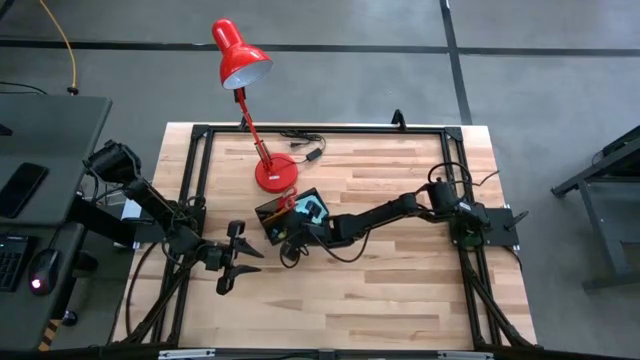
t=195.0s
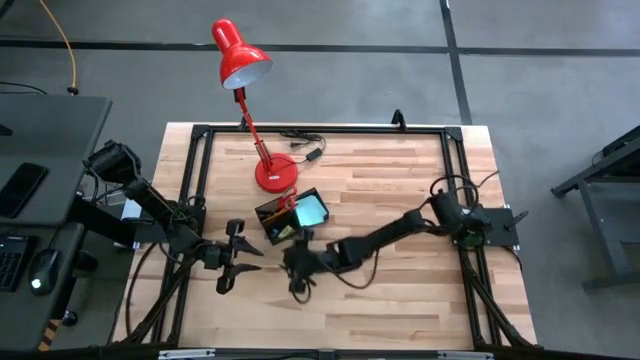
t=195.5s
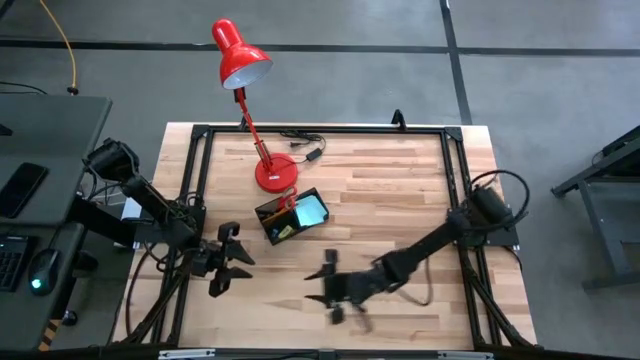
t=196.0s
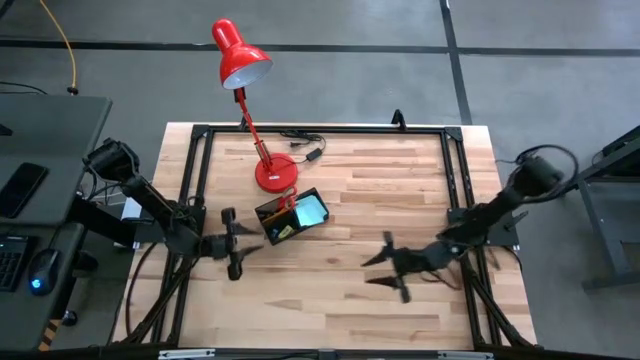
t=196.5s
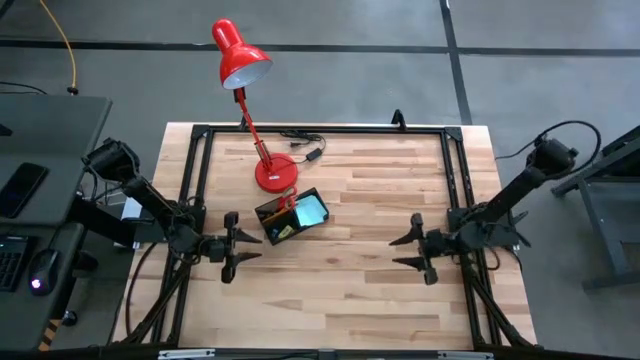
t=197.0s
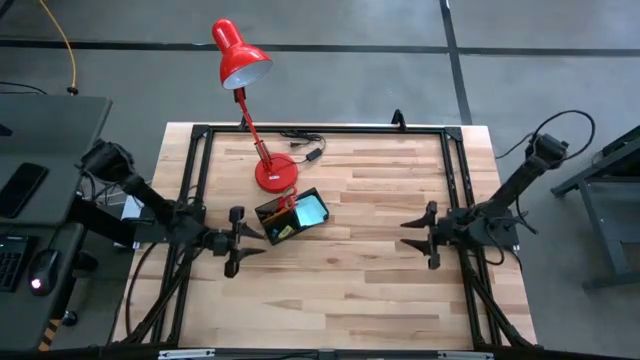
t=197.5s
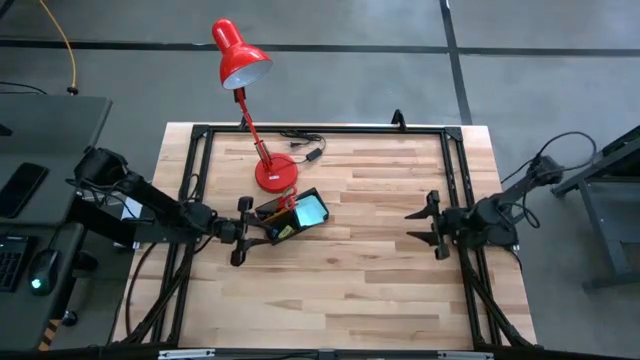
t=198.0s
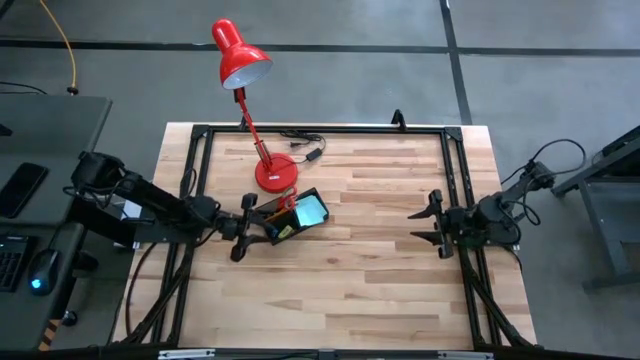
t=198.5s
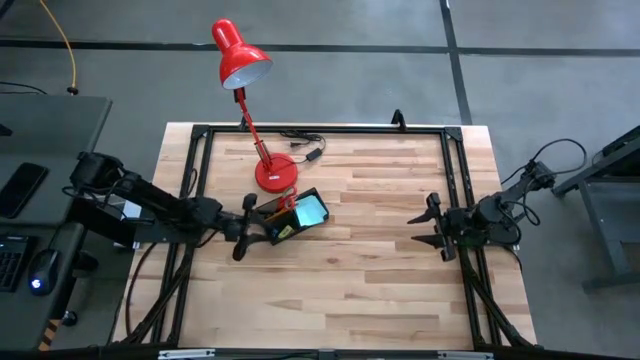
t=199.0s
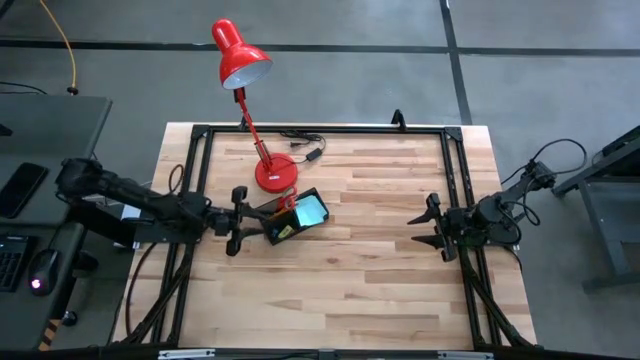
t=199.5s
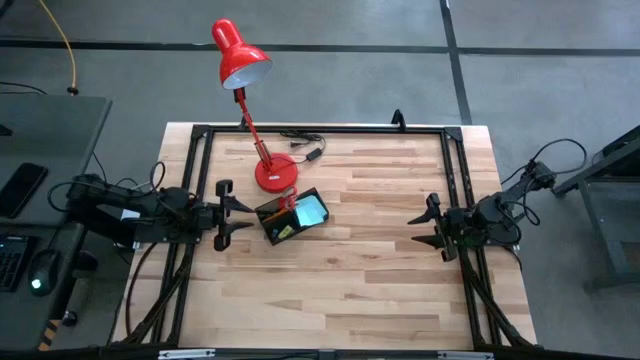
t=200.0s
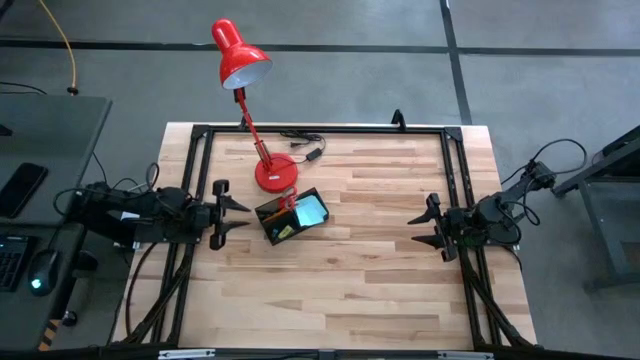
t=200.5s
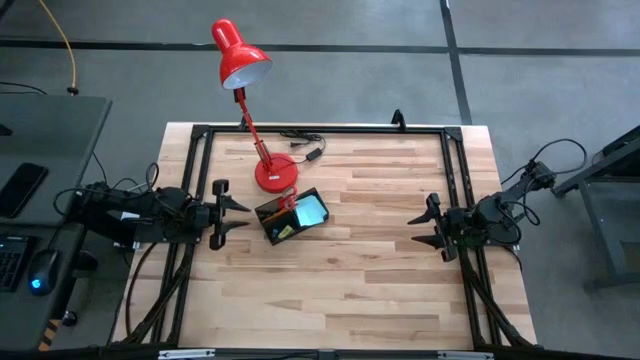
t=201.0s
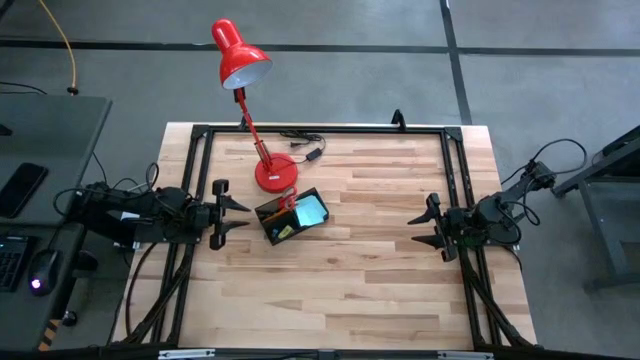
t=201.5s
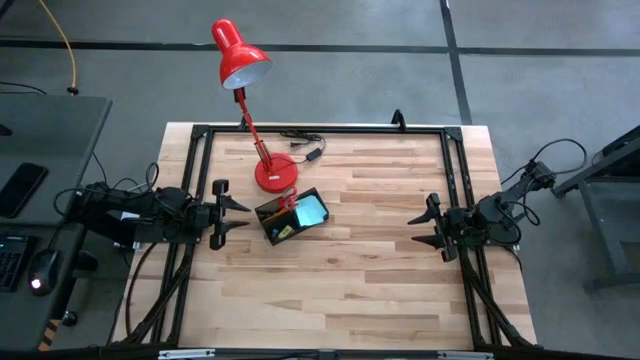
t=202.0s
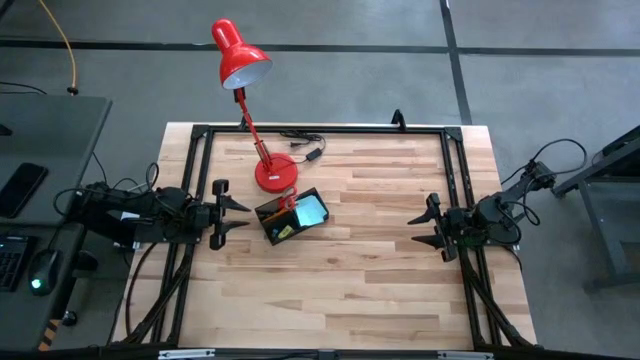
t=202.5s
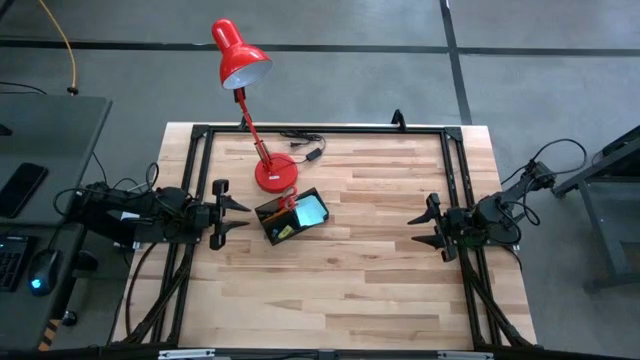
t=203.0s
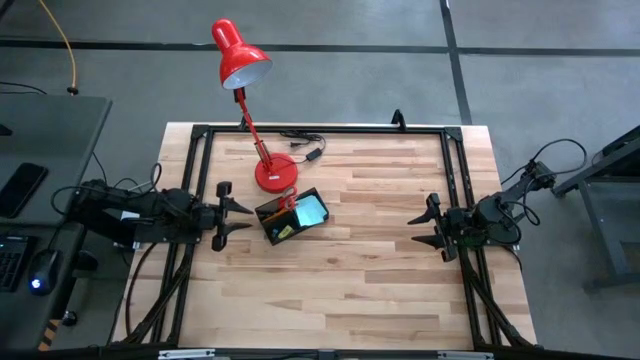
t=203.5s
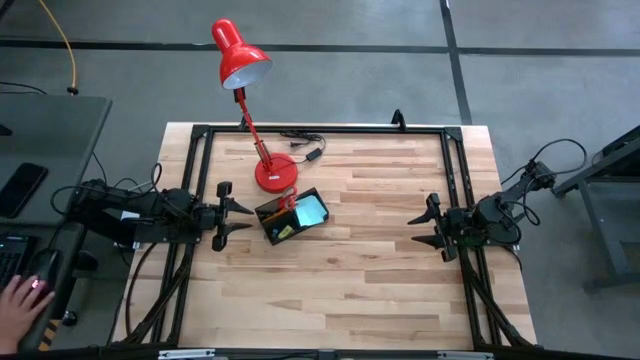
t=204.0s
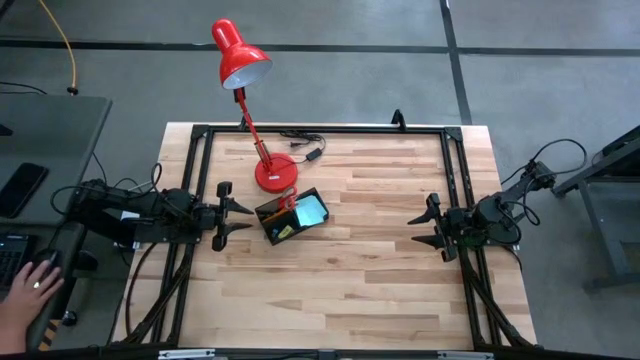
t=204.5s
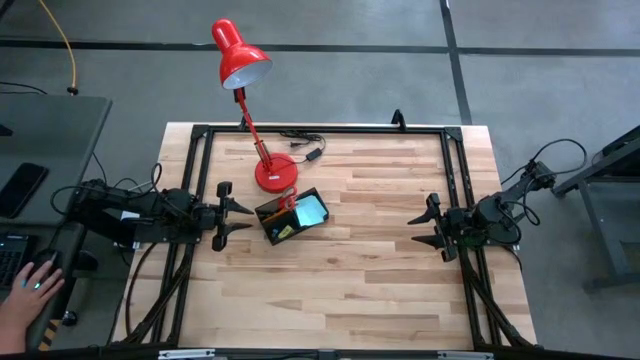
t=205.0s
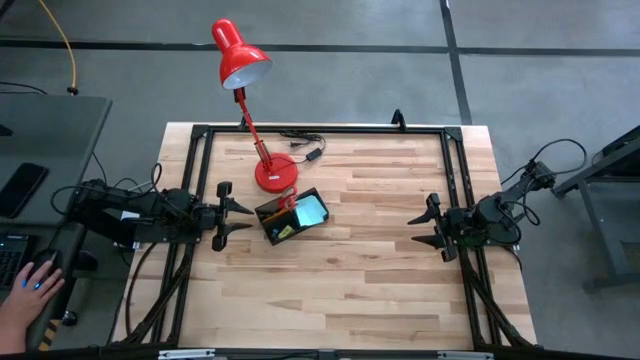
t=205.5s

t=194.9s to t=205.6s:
Task: Pick and place office supplies into organizer
Return to Home Position

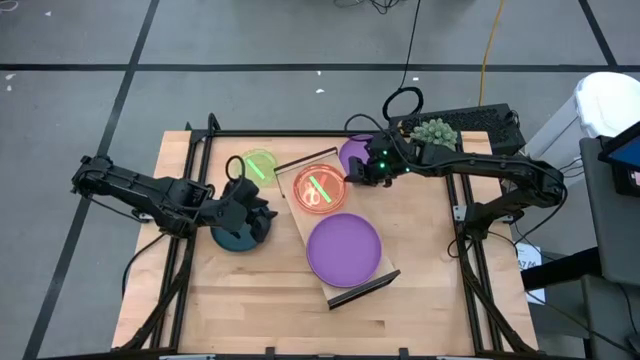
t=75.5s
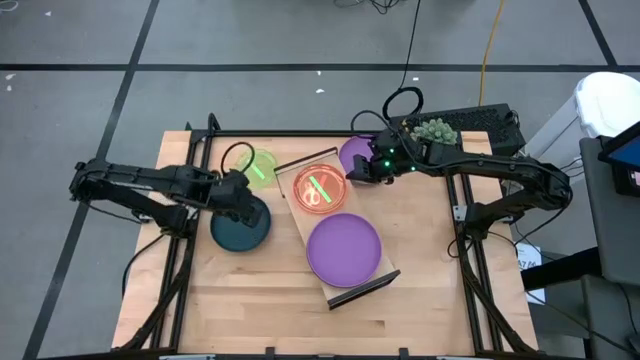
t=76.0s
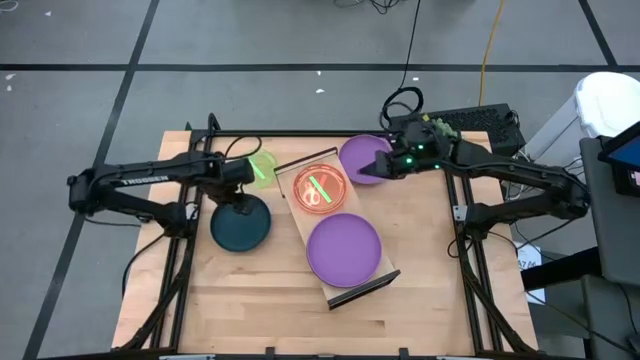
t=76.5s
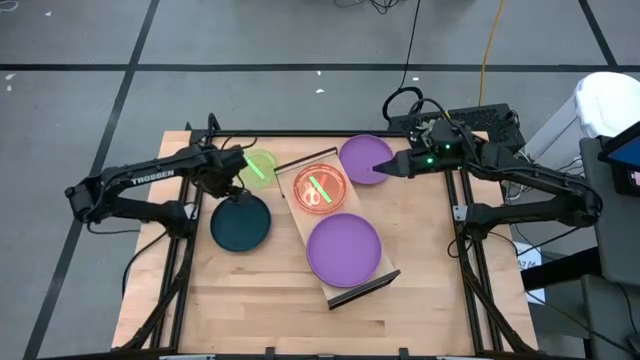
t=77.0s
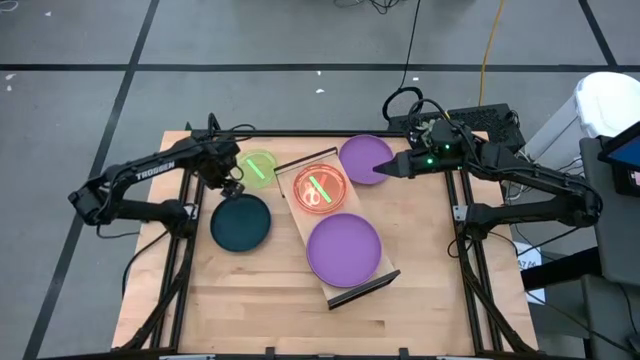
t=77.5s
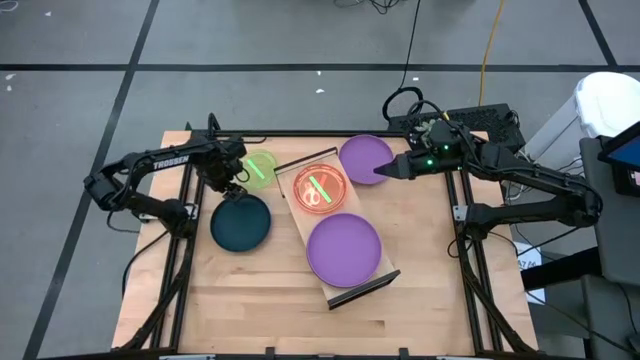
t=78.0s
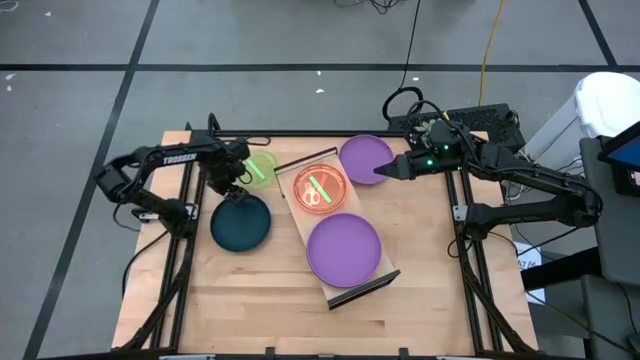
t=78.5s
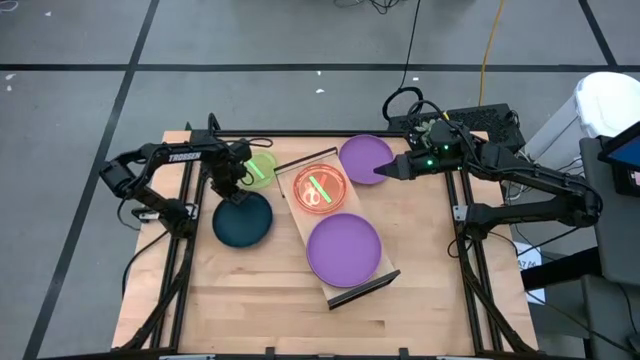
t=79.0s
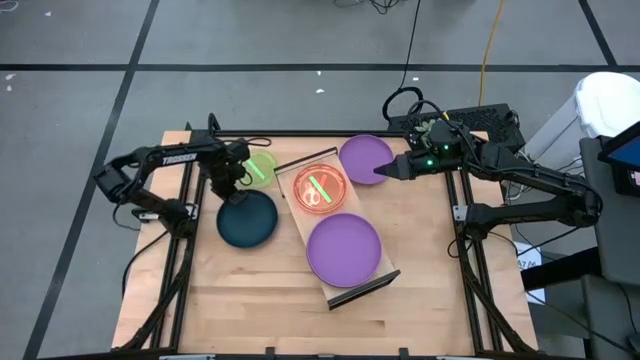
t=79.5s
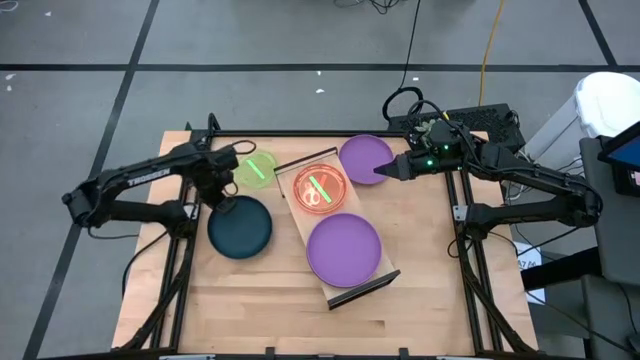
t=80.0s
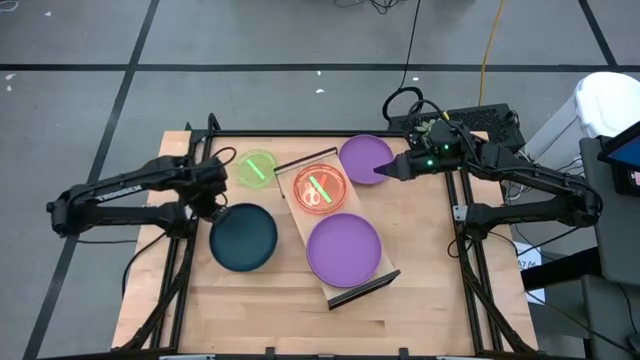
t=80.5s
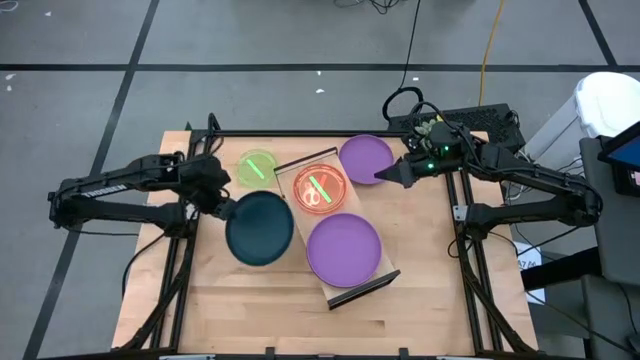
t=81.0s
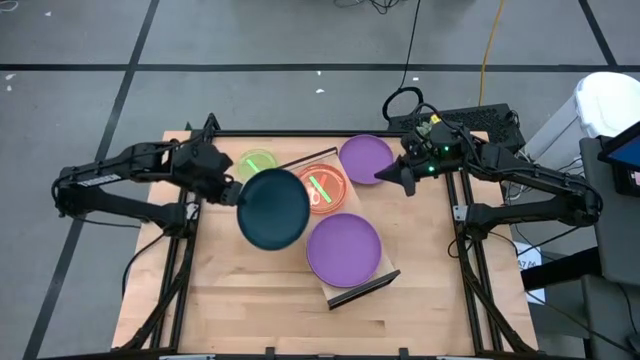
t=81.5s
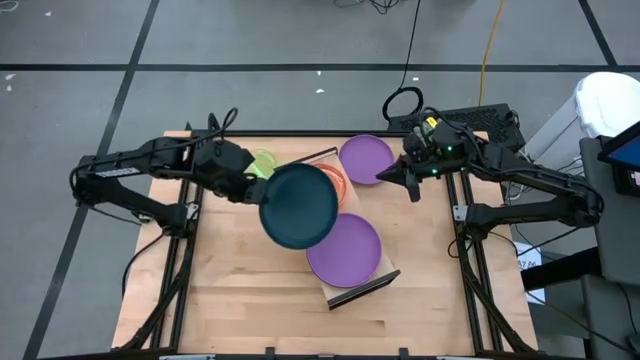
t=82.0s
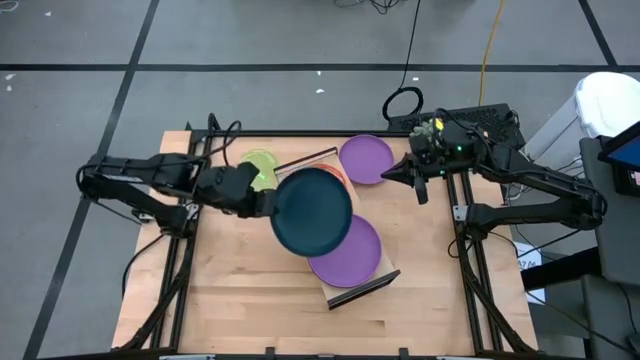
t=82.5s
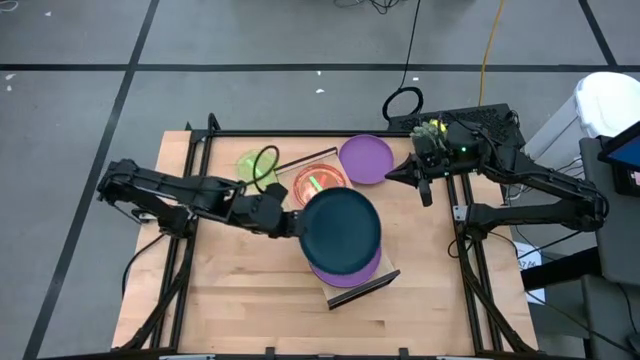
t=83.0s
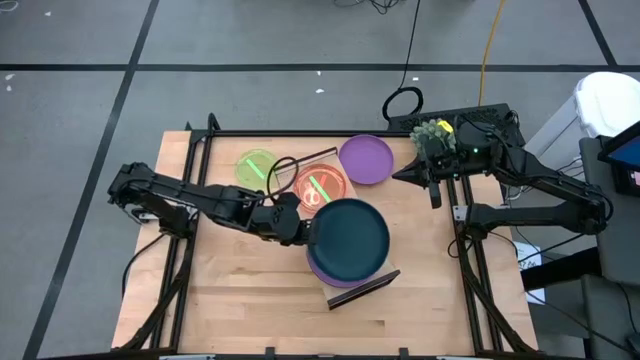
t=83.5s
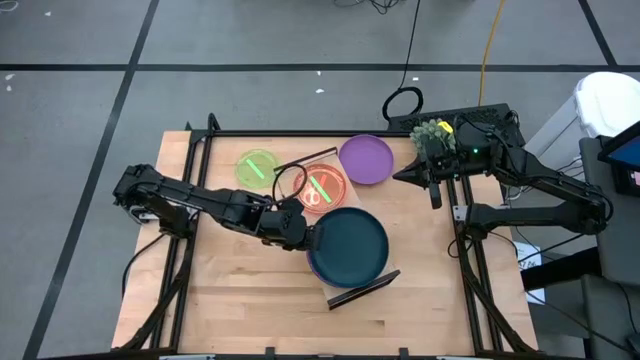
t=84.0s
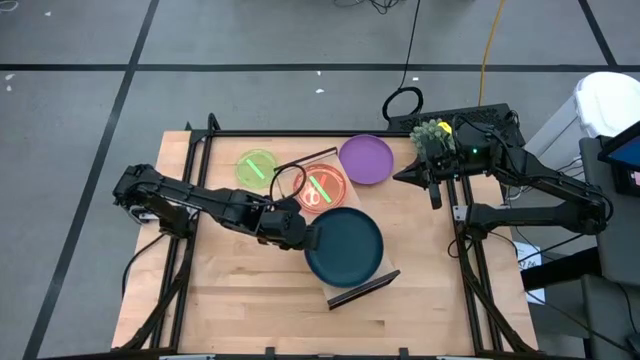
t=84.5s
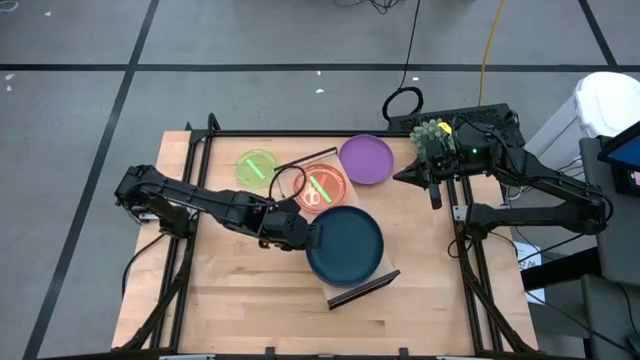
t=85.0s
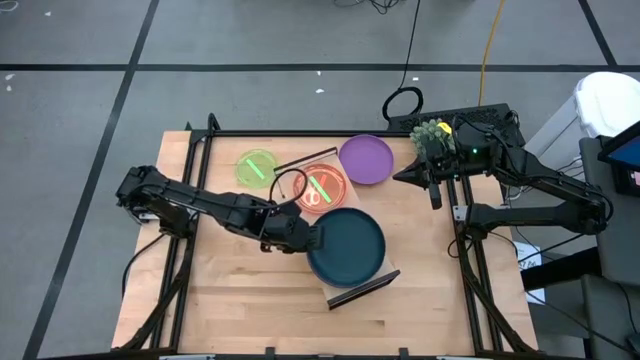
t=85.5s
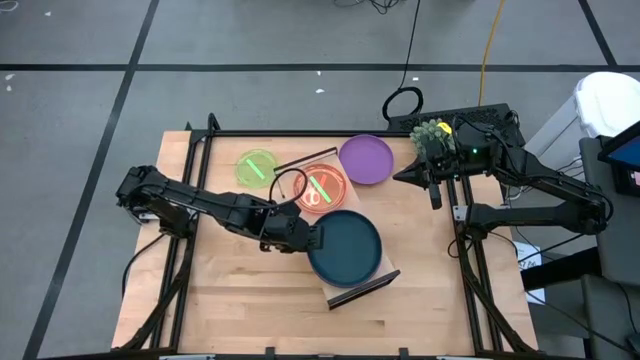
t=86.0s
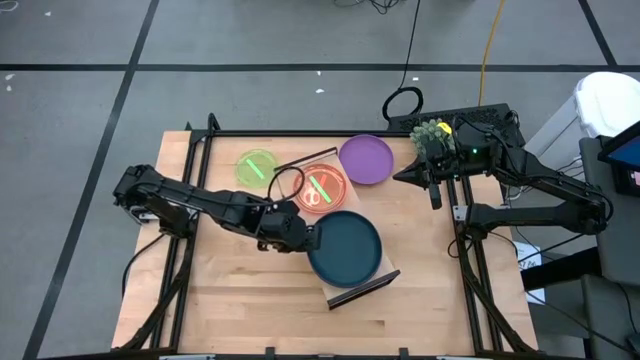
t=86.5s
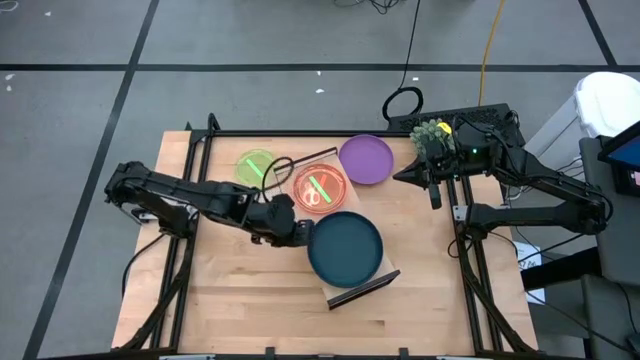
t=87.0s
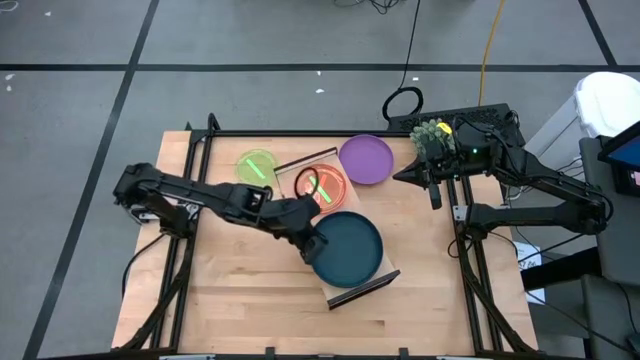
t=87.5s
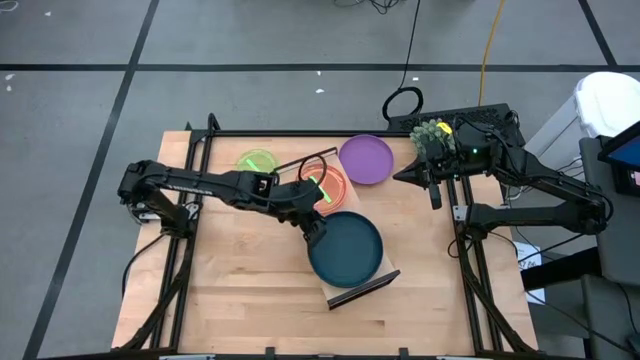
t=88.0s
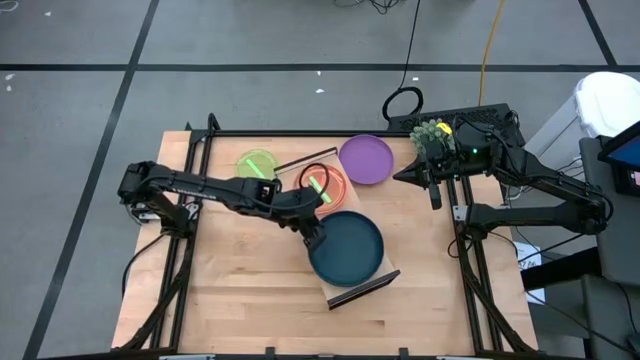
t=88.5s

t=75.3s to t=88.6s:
Task: Place and stack plates onto a shelf
Stack the black plate on top of the purple plate on the shelf
